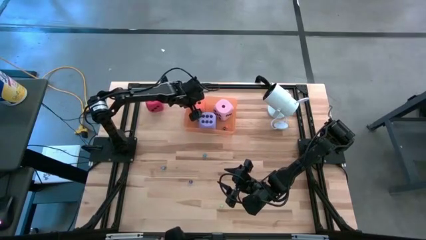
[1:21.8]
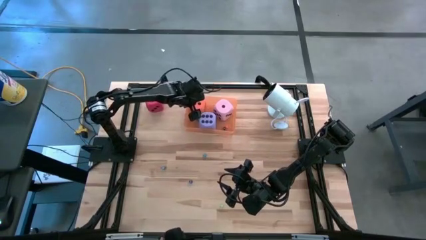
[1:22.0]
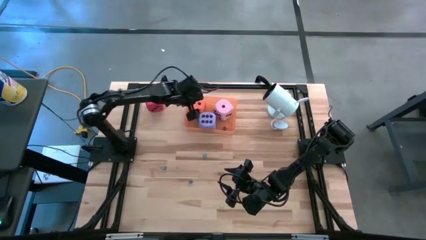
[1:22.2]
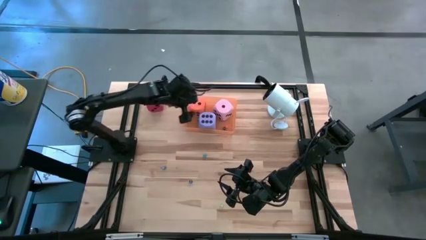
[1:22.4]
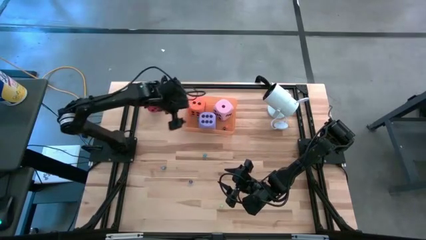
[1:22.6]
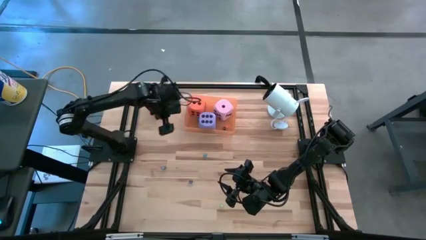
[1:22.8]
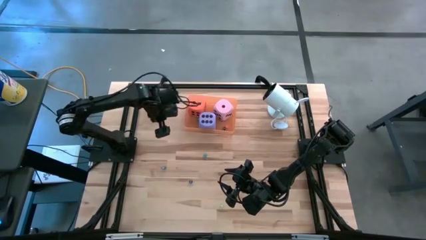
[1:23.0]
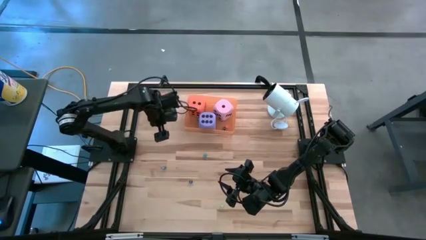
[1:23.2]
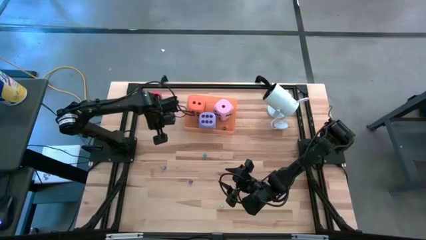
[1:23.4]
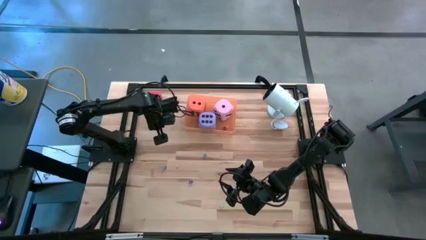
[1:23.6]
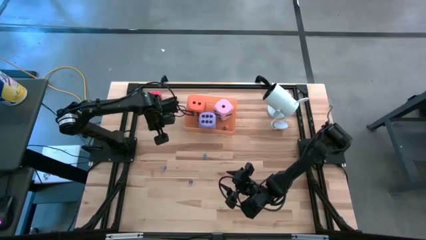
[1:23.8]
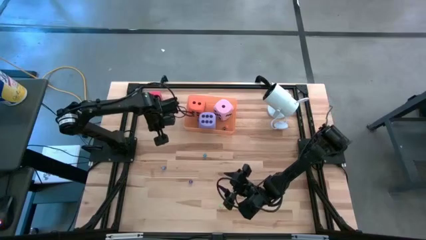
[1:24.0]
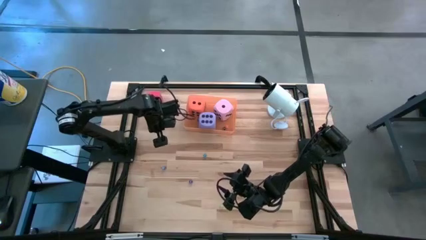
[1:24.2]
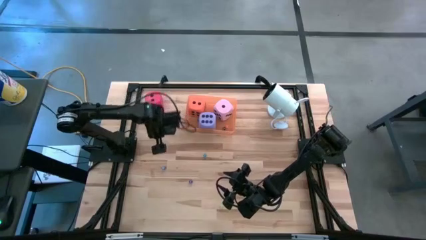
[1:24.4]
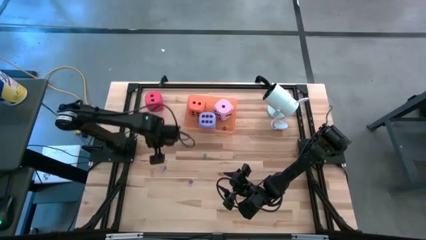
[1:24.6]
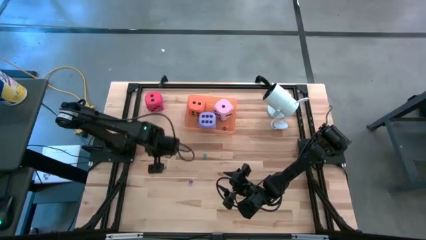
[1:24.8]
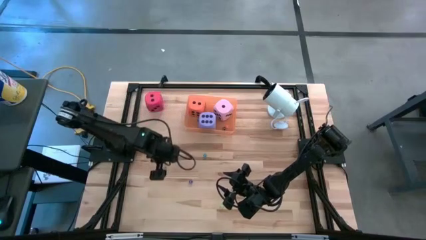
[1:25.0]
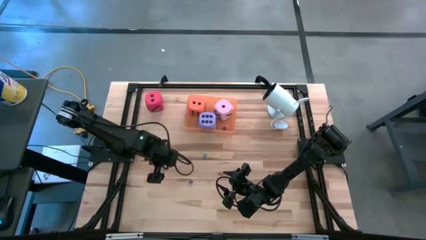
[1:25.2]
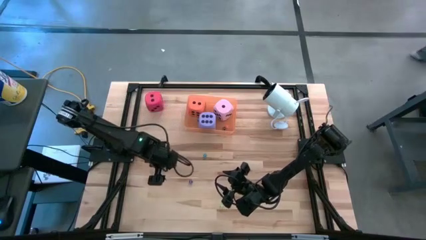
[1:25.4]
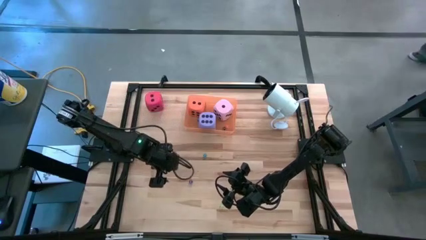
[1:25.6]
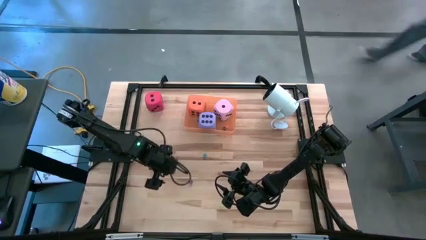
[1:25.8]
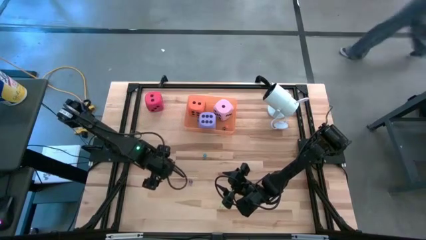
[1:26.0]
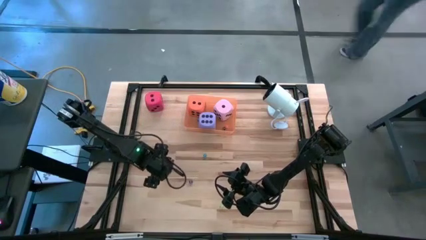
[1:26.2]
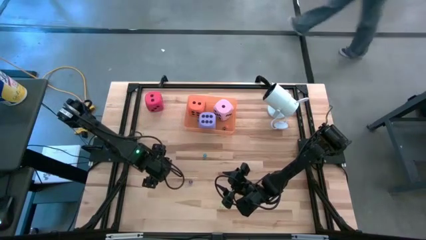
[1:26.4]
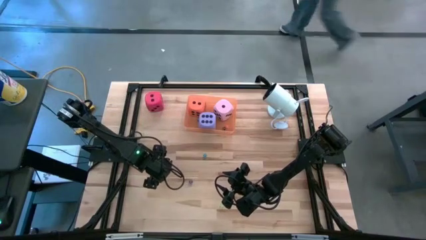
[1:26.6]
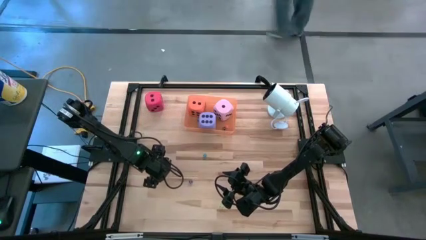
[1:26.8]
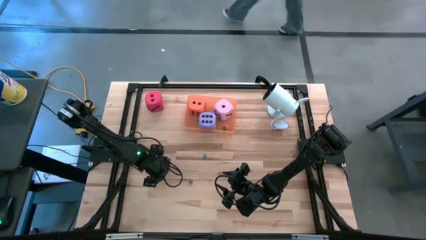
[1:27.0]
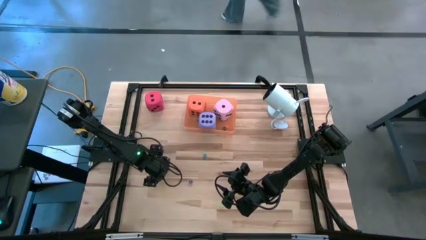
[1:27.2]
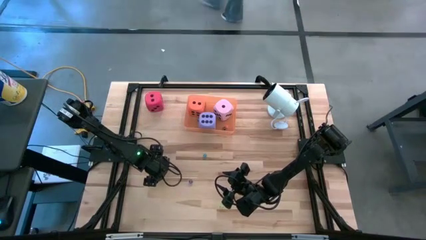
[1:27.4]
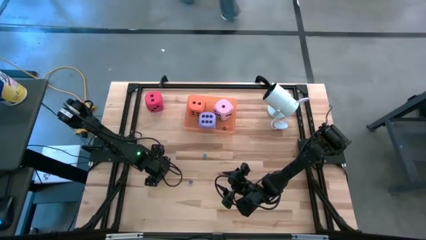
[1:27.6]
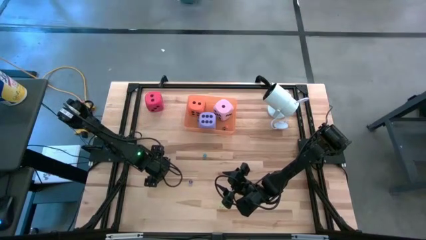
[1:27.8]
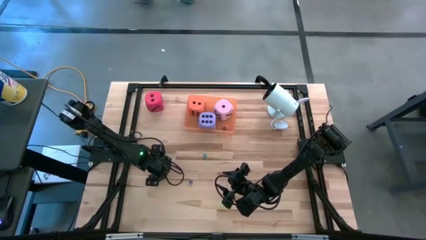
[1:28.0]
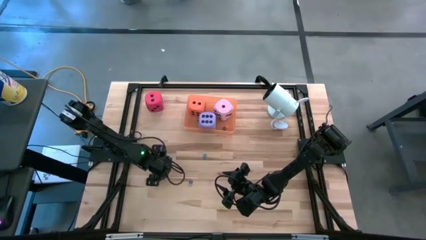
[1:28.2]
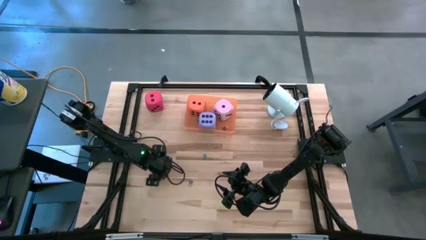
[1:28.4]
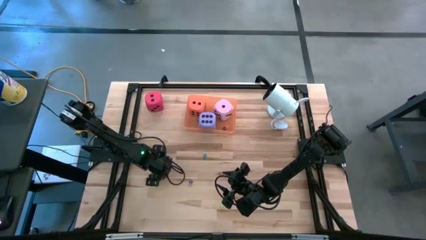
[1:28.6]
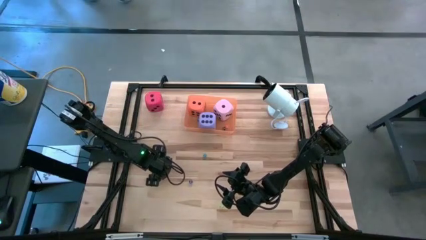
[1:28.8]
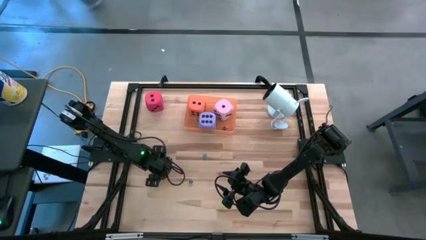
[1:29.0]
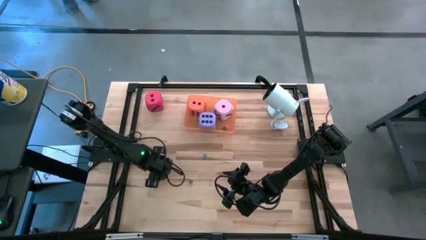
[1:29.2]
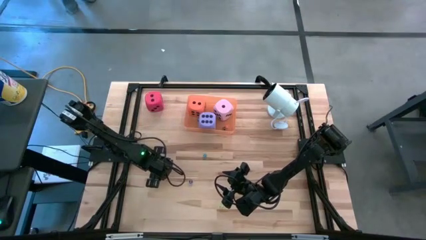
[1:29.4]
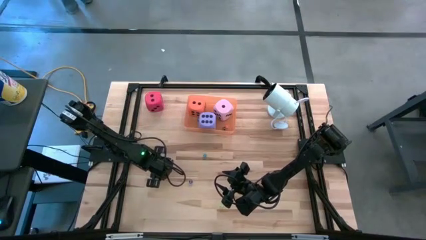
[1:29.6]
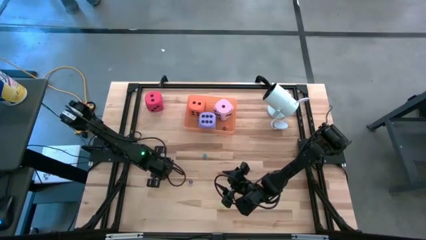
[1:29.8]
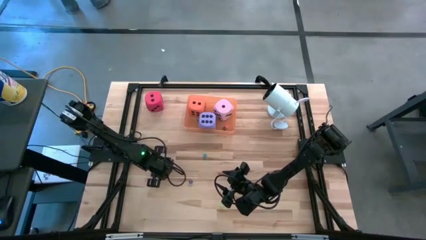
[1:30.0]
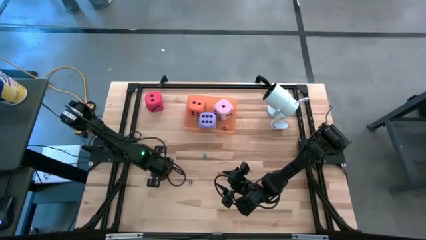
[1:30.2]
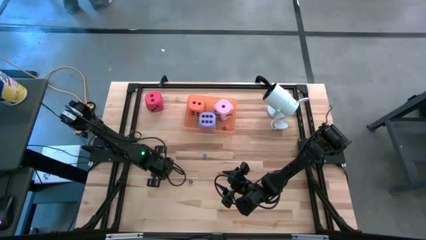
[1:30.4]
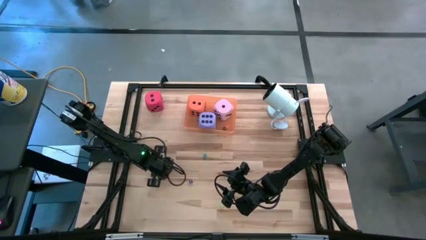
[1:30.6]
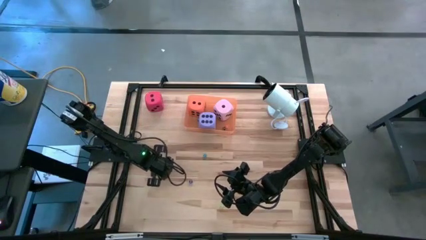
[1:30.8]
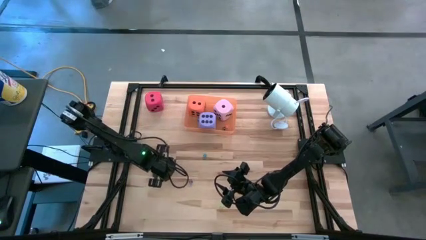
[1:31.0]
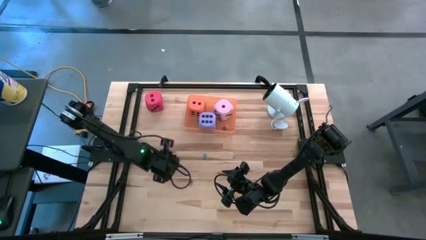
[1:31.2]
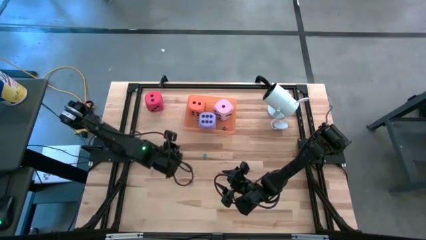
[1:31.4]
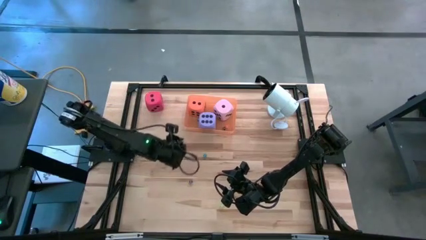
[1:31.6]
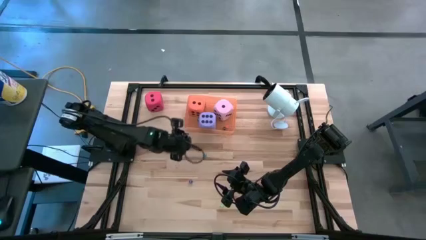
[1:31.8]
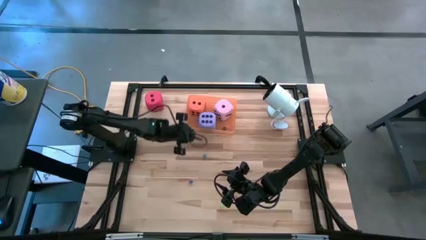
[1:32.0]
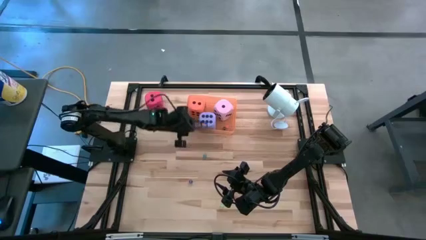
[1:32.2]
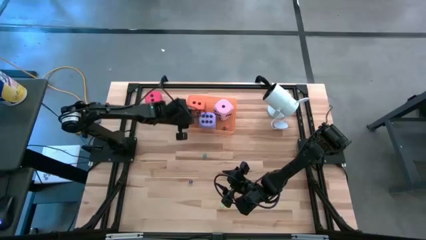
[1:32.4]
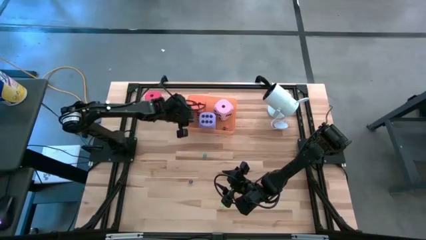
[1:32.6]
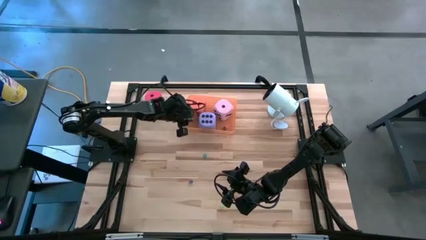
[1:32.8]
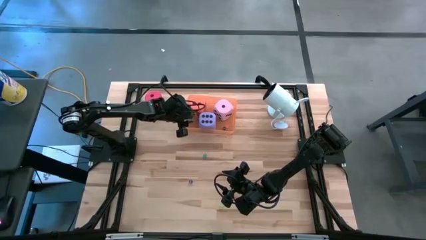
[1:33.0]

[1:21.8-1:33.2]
Task: Pick & Place Dice
Put the small blue die into the orange bin

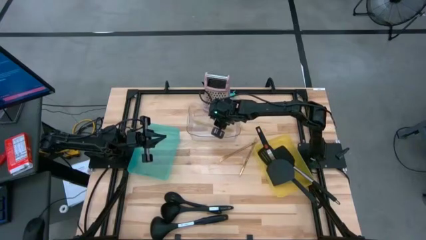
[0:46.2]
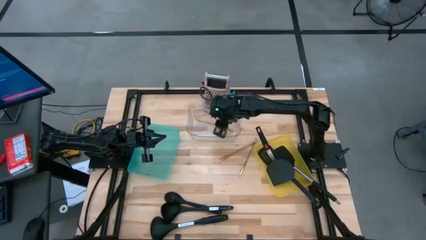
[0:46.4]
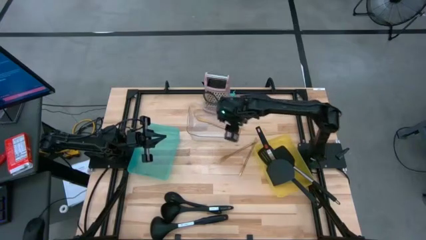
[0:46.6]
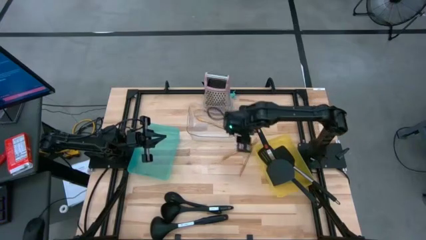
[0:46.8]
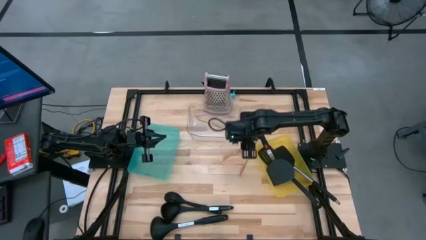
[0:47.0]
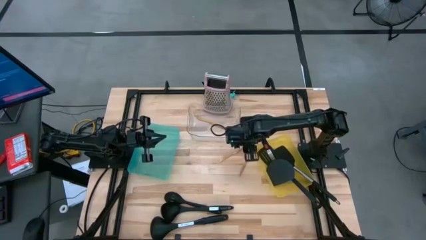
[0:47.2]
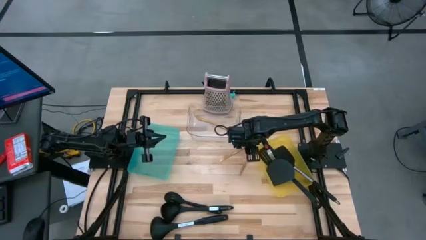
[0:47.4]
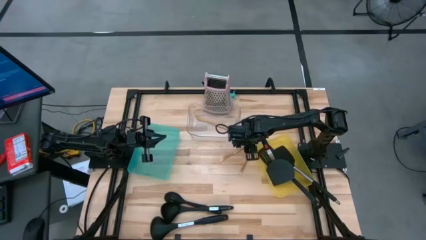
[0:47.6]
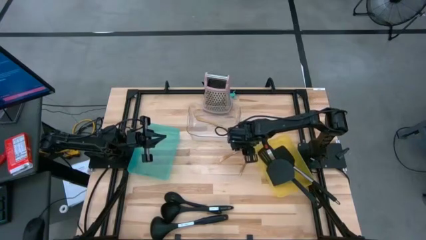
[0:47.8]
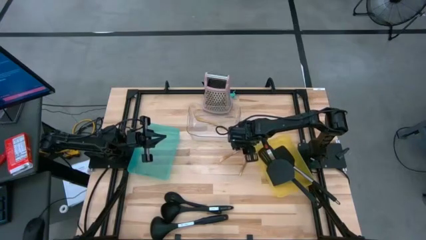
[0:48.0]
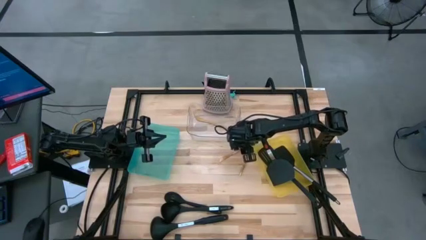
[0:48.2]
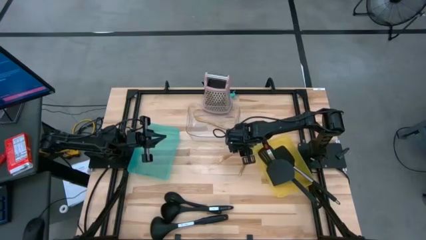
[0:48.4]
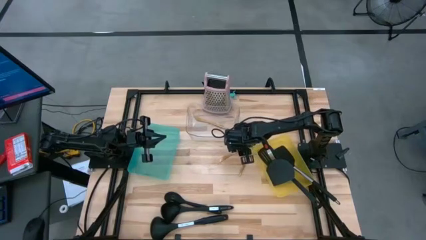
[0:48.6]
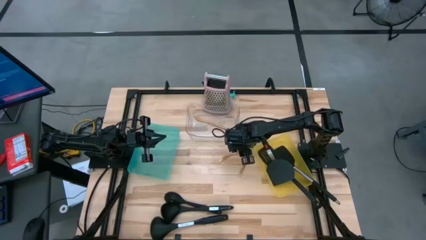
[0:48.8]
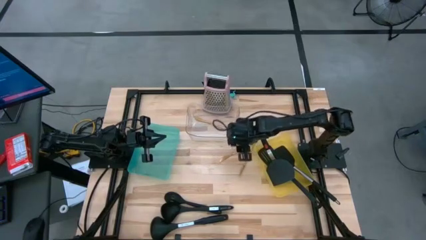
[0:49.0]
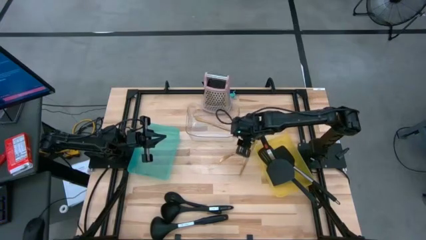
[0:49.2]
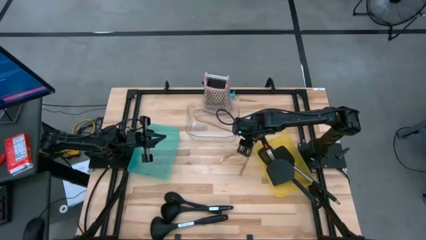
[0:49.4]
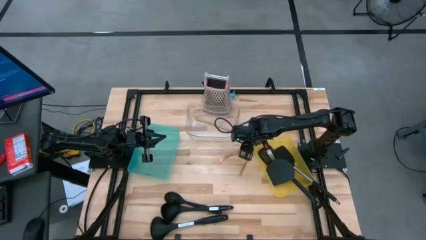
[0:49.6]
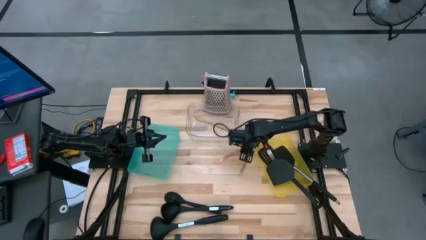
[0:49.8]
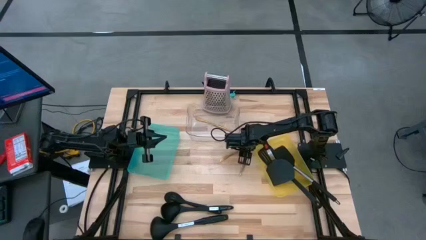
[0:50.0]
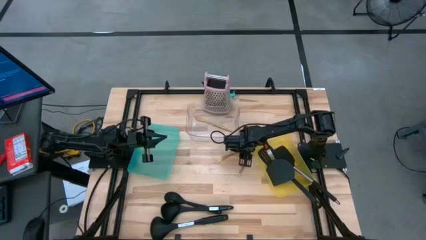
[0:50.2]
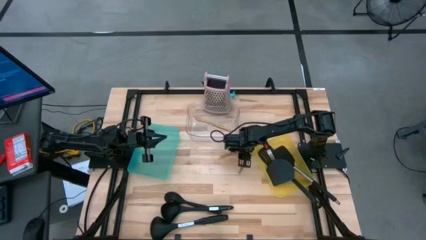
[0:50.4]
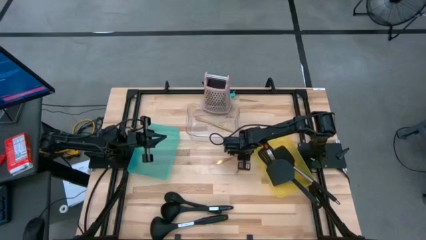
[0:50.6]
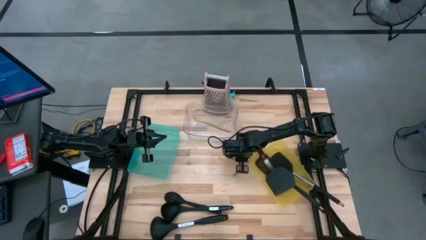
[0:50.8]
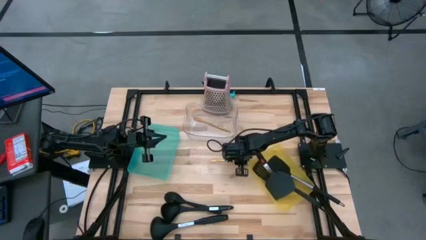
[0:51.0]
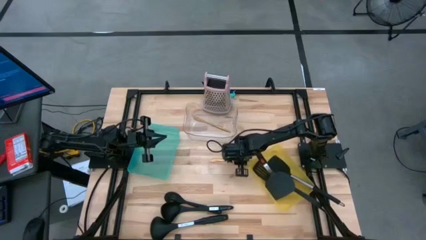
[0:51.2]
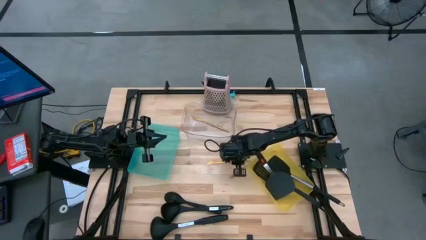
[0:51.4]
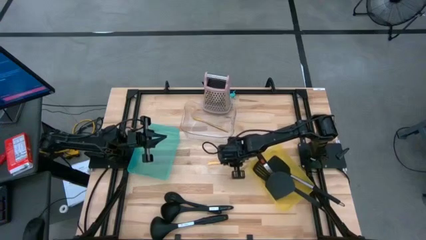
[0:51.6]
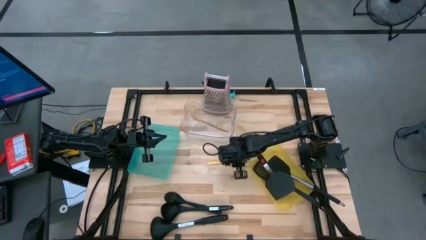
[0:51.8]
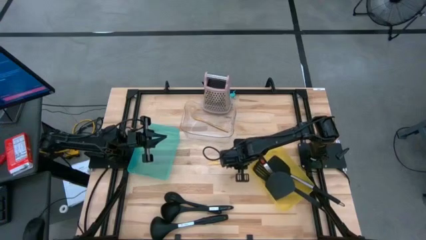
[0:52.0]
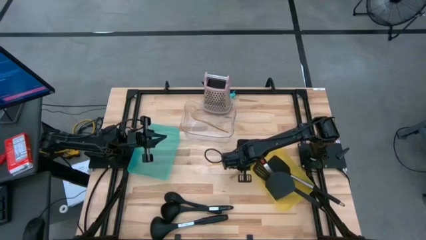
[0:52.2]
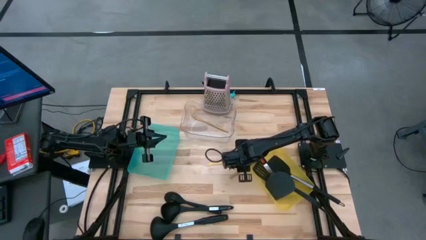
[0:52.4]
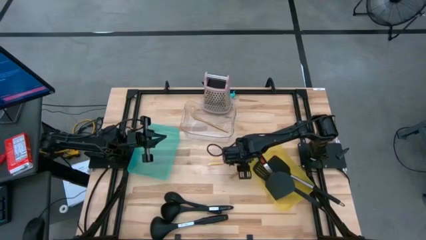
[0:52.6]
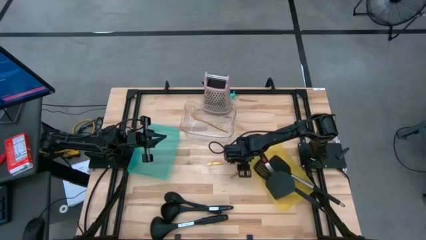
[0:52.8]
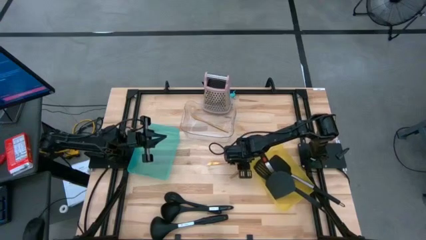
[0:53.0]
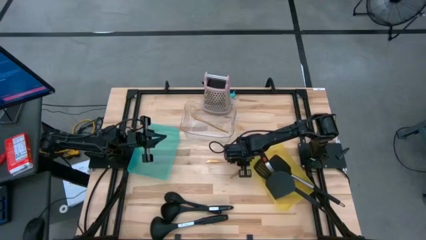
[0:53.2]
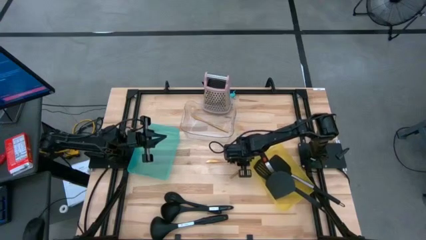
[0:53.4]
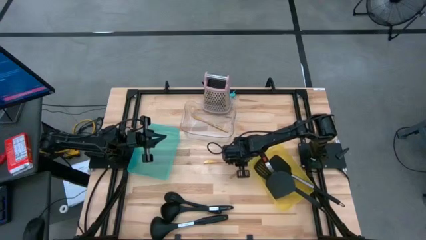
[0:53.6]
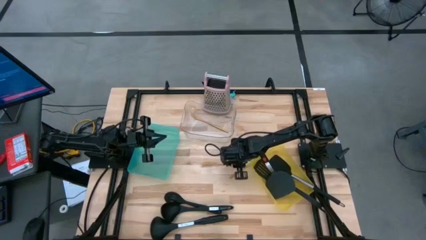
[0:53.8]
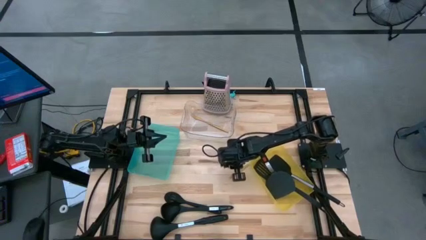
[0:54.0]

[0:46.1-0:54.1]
Task: Pick & Place Kitchen Items
Put the gold knife into the transparent bin
